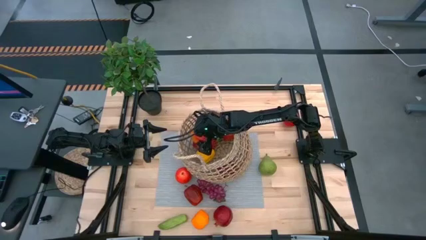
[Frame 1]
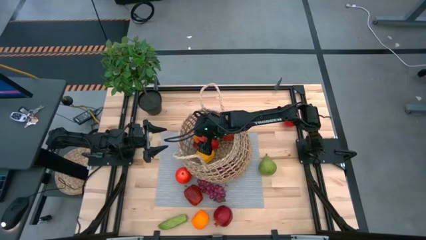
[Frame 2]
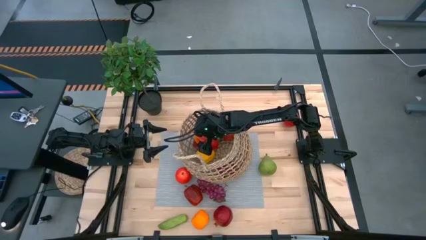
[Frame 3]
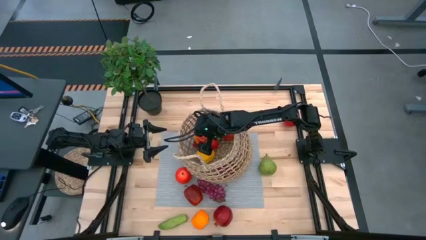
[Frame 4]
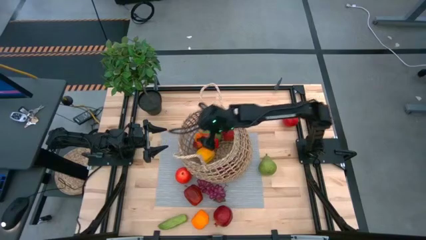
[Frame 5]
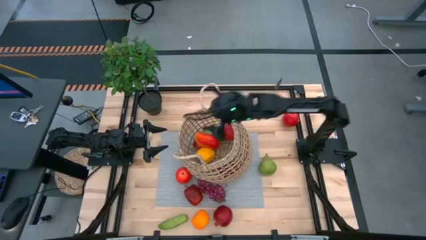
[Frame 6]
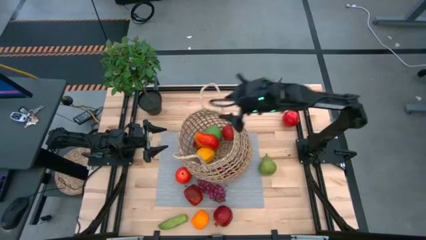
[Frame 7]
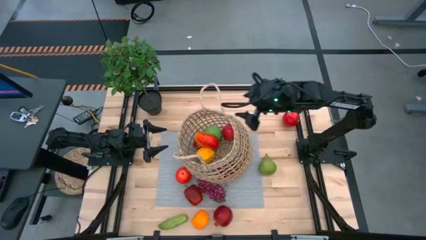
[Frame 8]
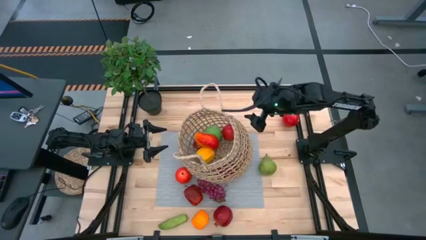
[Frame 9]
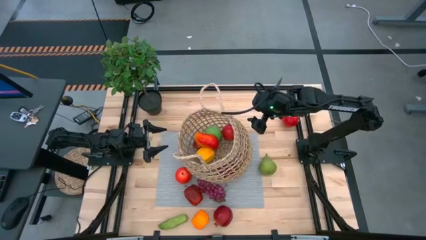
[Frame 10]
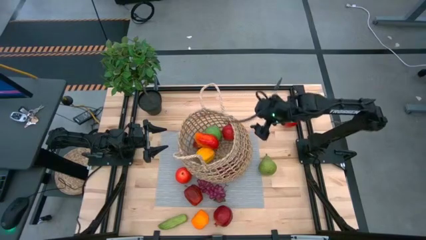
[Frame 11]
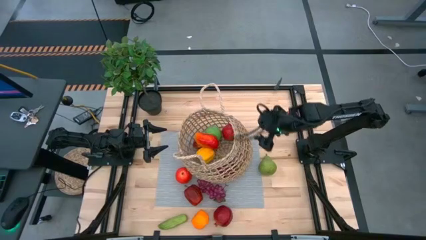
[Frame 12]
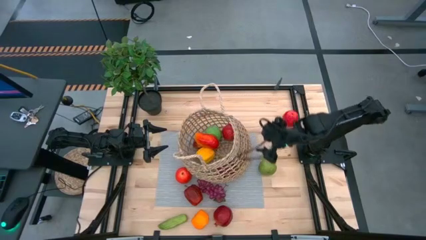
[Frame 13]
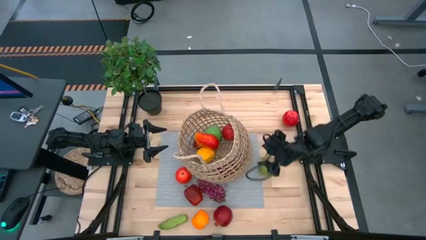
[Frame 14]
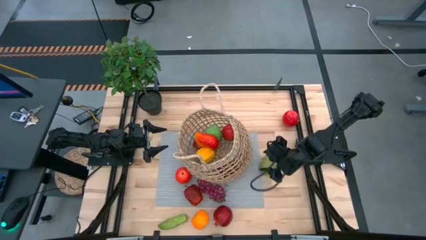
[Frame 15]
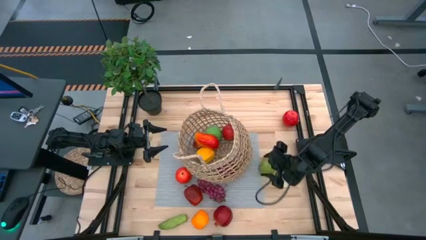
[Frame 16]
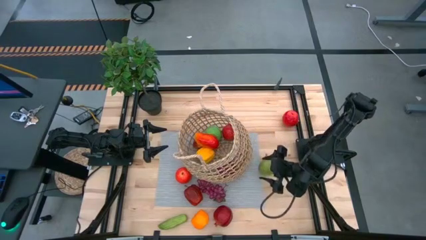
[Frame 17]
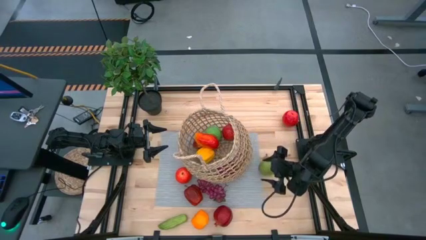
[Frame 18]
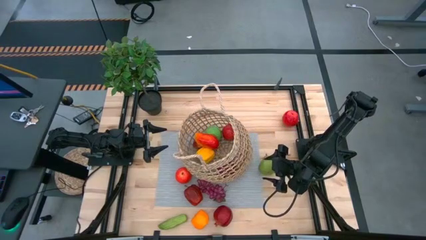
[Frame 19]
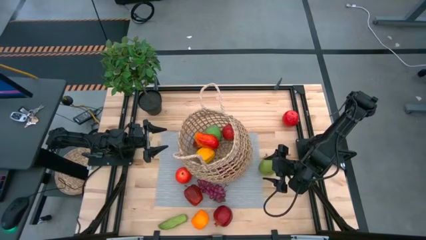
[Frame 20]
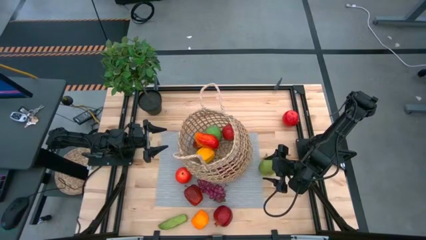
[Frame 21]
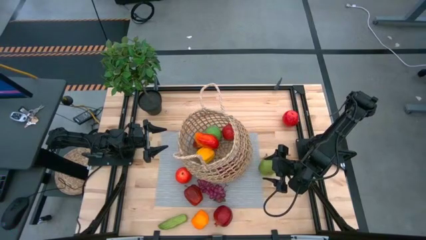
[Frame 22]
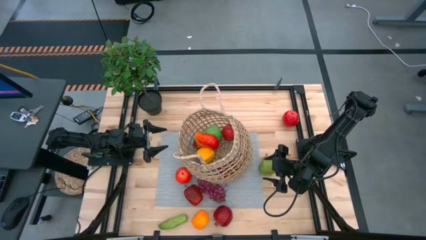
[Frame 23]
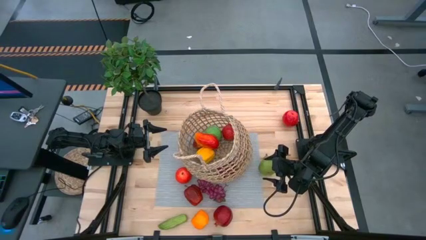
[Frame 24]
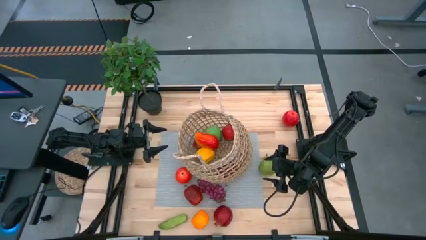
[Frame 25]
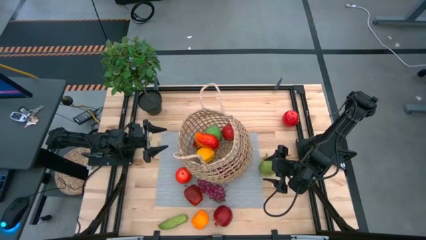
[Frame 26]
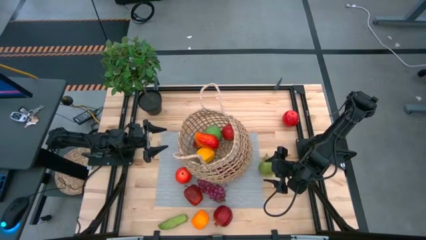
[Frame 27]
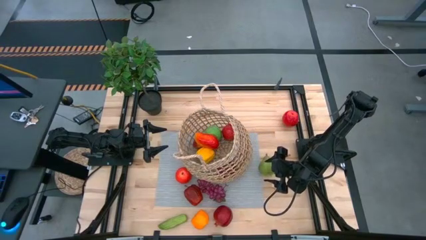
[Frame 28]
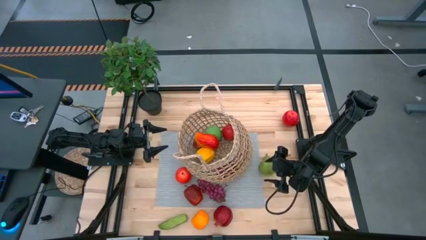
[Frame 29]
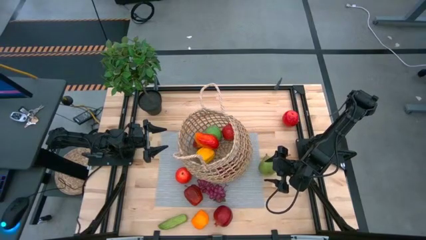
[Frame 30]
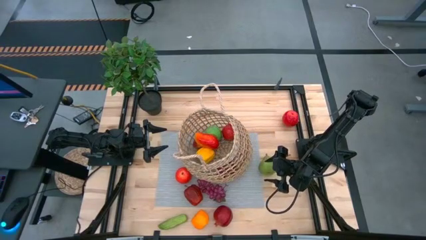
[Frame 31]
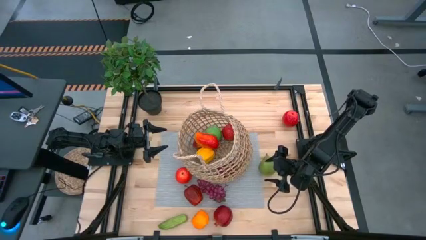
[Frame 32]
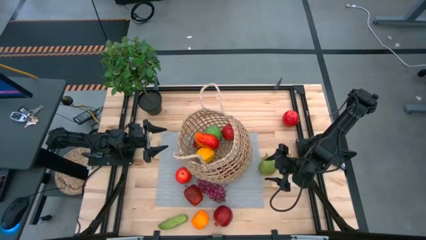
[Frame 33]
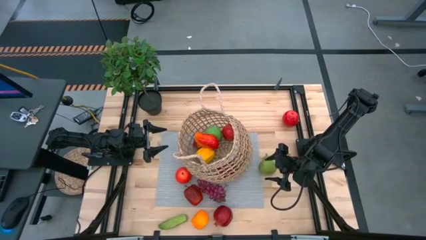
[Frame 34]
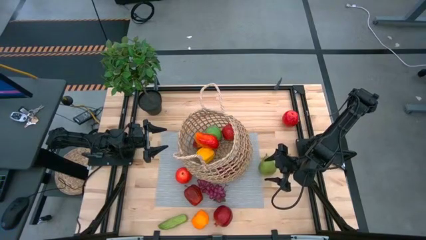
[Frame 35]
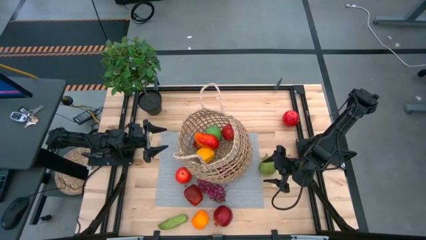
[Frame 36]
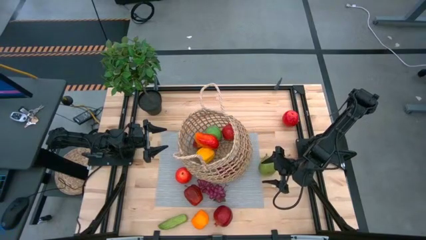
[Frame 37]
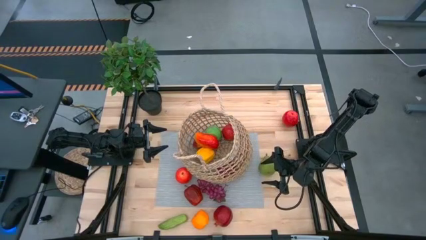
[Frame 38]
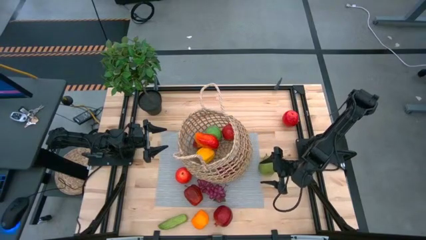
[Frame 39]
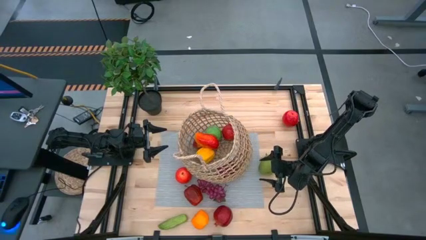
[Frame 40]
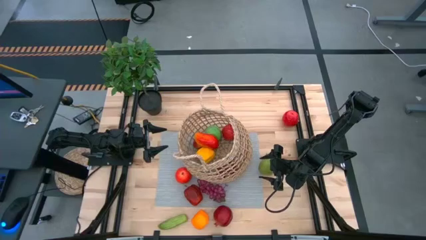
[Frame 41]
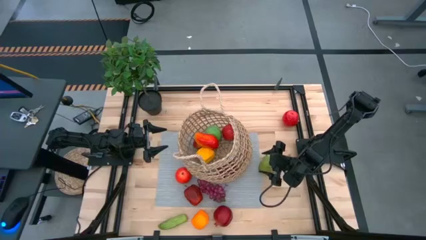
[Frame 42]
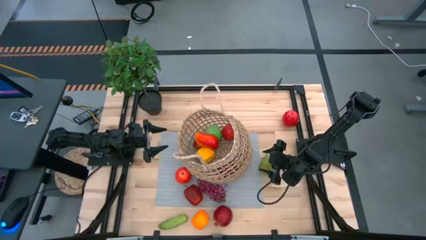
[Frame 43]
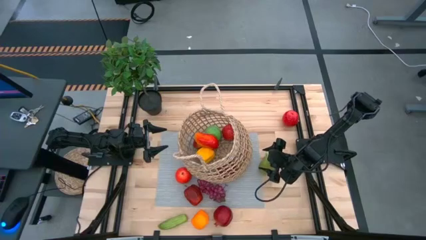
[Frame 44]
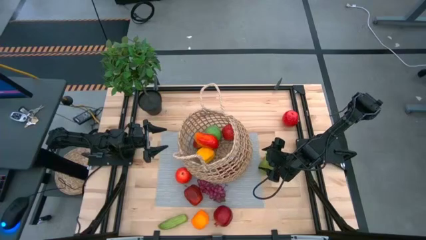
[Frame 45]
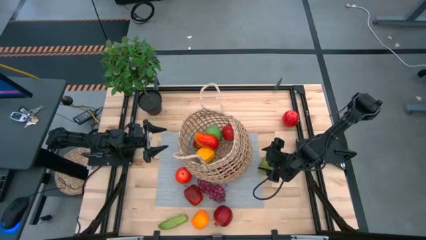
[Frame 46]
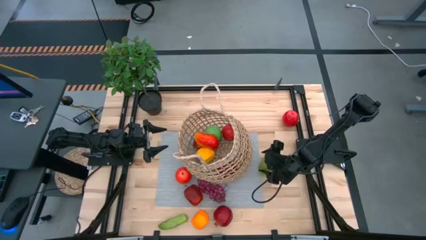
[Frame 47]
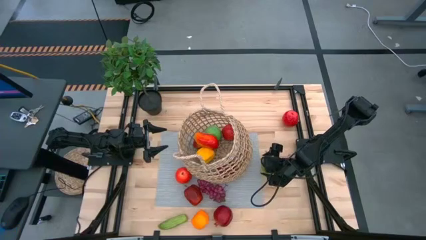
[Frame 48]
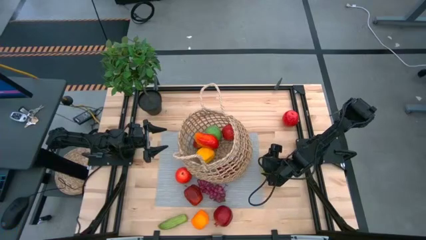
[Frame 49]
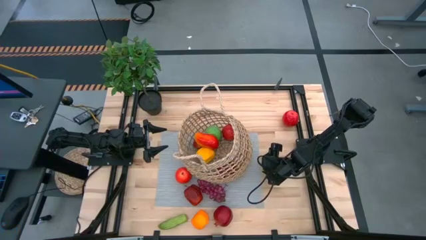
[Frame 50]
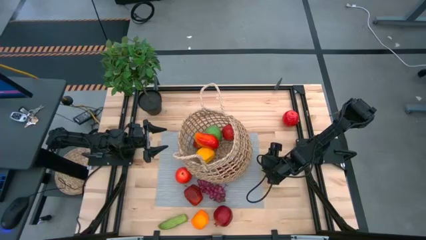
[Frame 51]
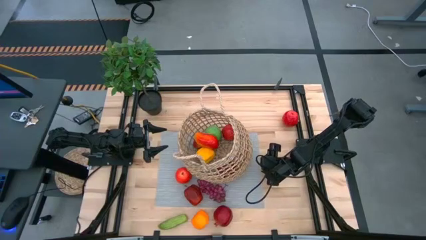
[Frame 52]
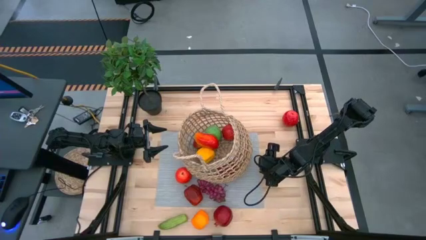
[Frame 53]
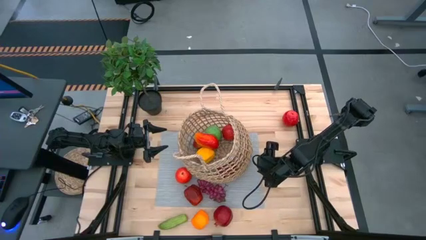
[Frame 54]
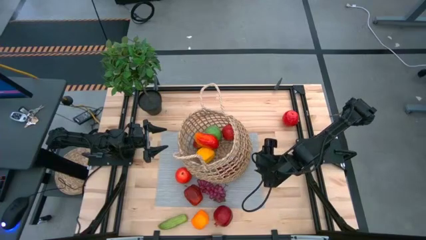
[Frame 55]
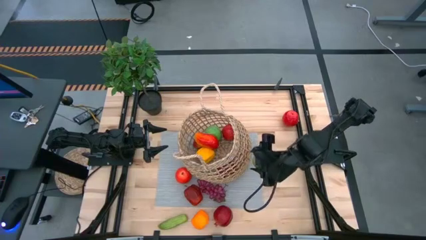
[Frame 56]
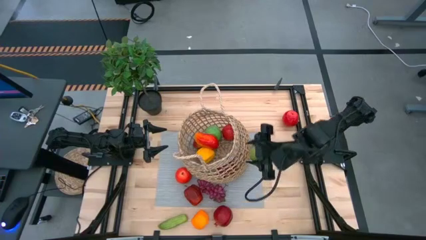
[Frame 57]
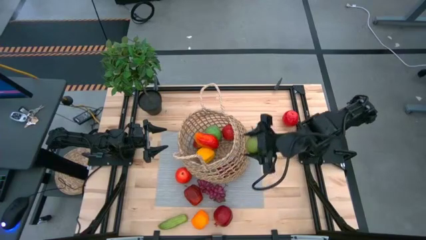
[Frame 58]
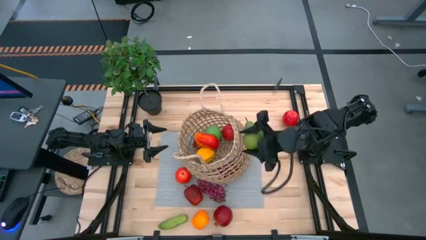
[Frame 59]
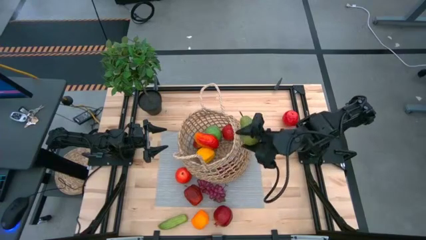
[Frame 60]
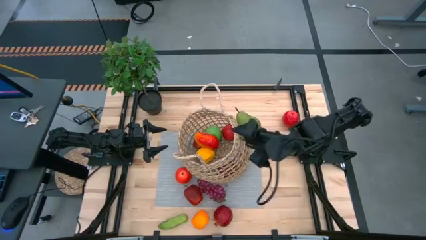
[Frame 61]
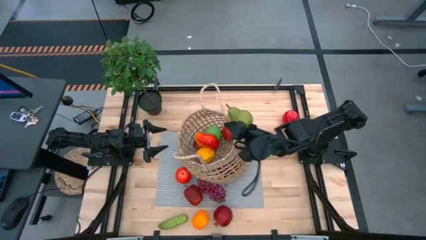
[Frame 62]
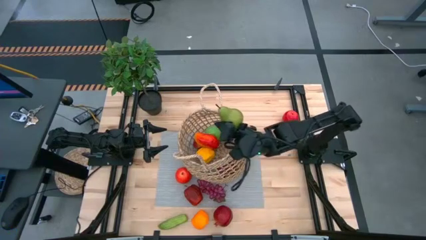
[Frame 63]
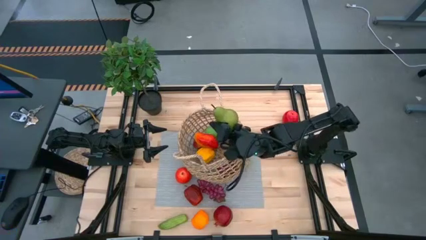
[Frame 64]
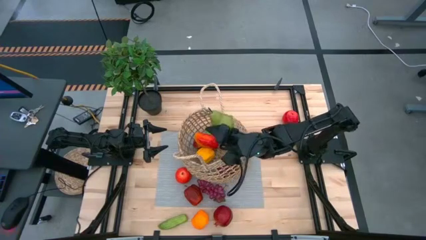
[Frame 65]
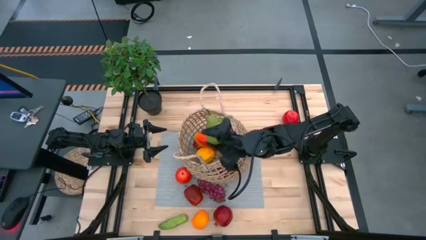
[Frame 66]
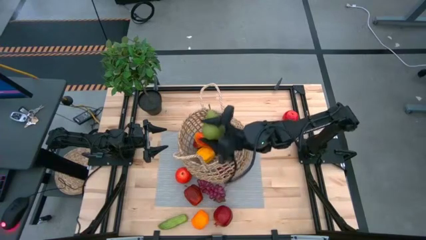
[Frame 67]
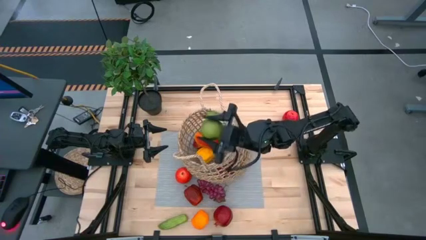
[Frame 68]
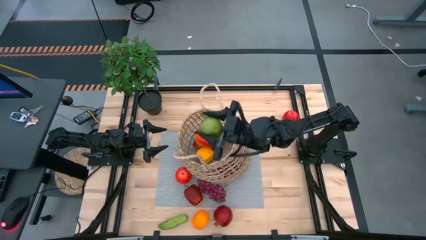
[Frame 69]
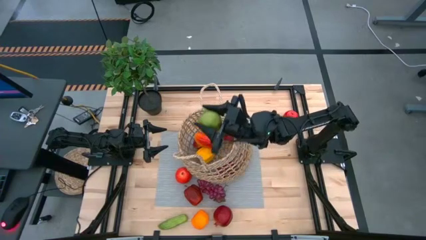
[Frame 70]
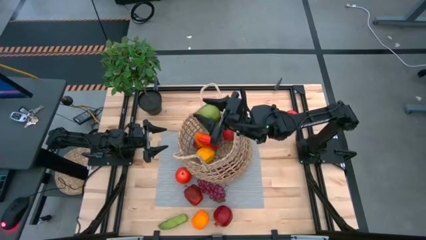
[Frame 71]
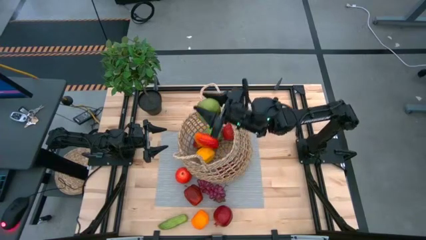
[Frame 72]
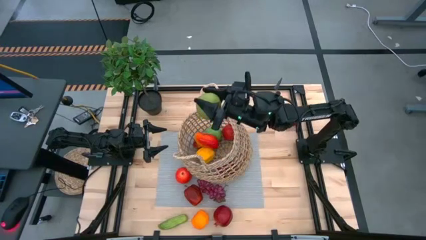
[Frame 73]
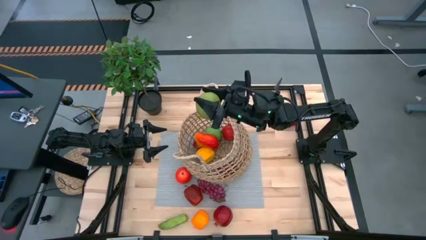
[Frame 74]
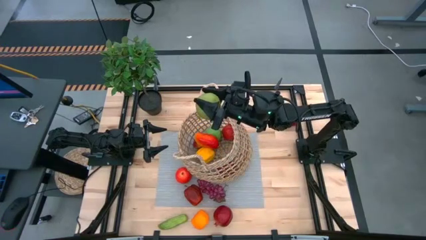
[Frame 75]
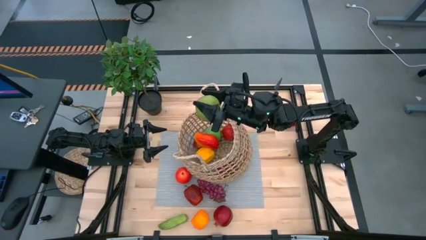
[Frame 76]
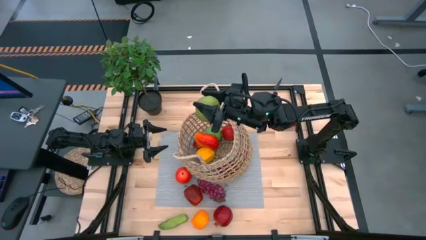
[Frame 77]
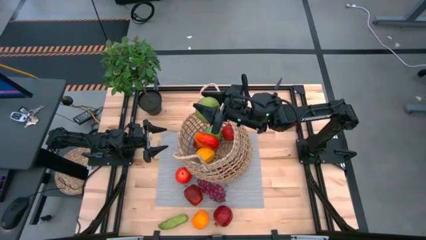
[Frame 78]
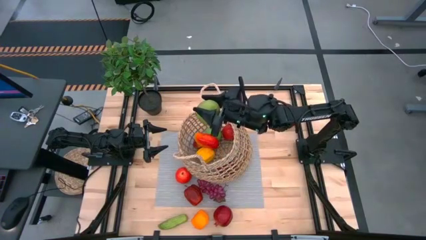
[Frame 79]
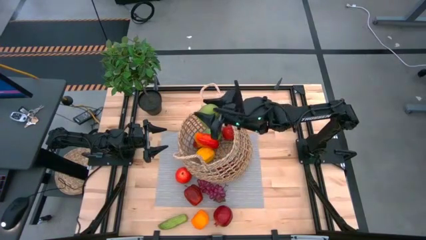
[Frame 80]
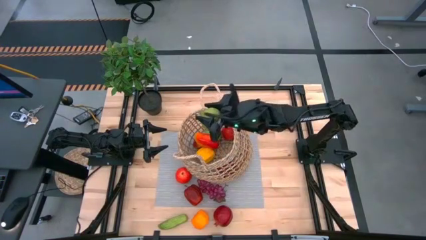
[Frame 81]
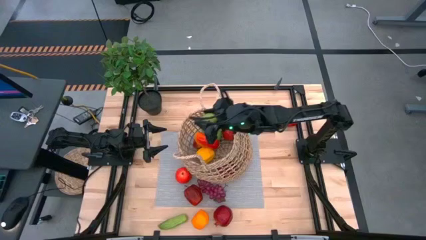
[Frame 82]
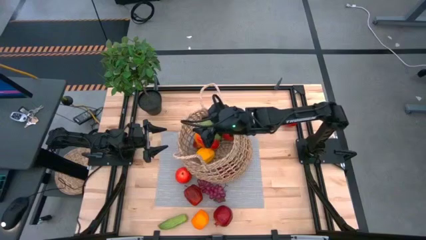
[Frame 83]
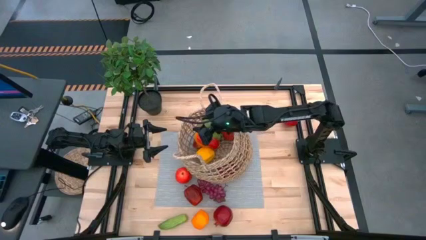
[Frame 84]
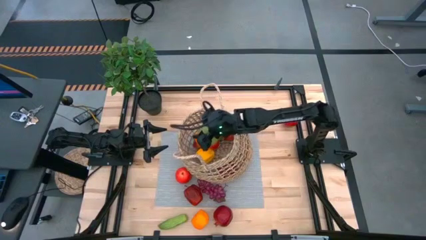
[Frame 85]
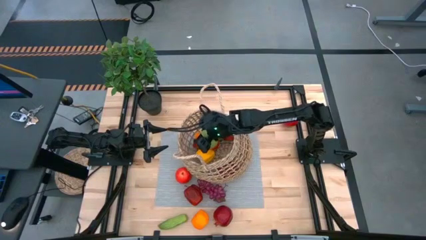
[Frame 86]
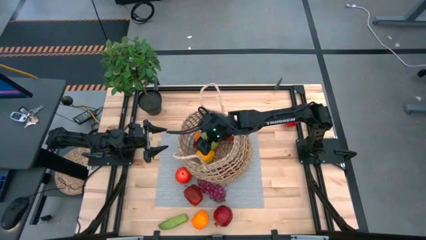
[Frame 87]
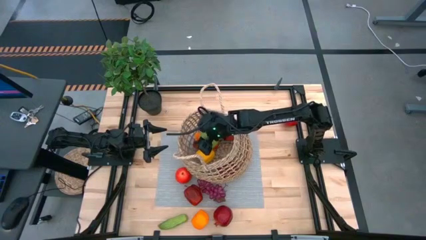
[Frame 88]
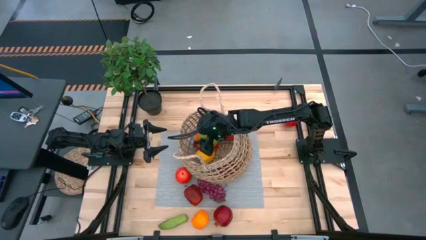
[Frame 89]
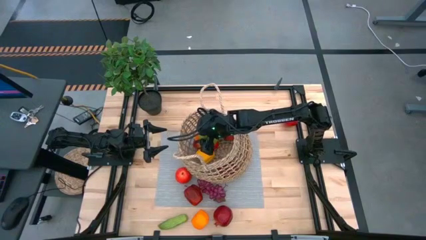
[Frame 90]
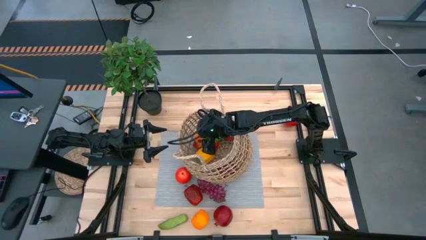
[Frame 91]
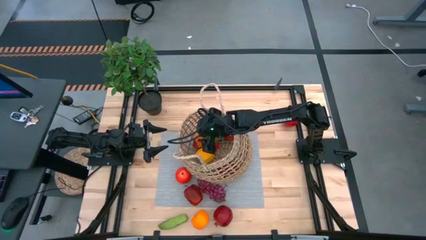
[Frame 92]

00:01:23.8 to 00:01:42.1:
Task: Build produce basket
Put the pear into the basket
